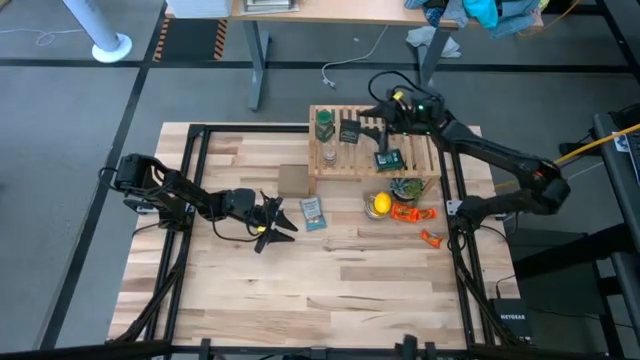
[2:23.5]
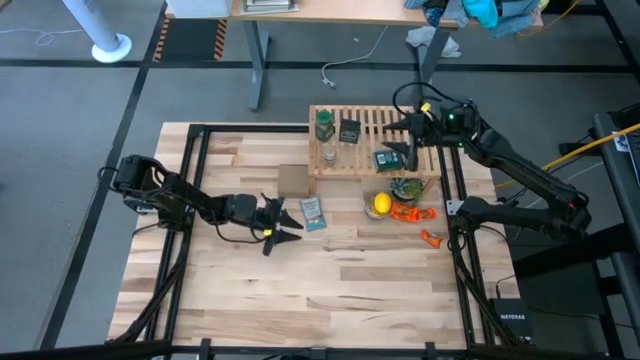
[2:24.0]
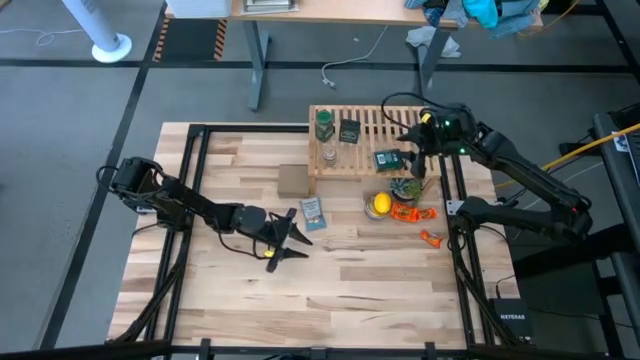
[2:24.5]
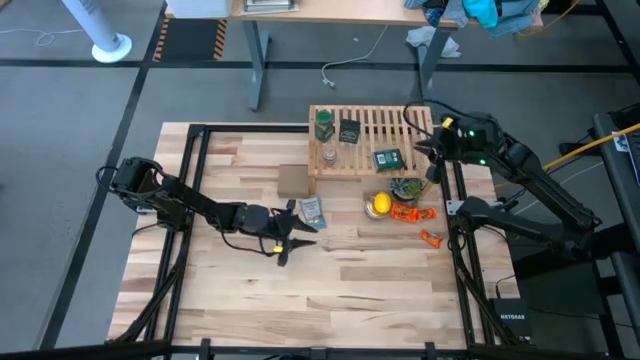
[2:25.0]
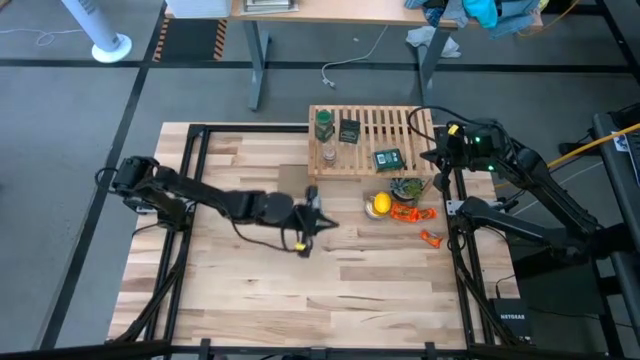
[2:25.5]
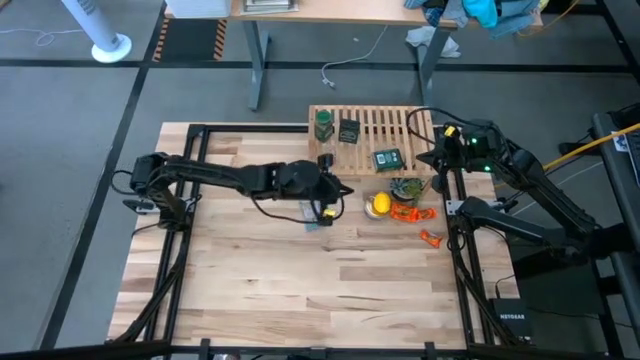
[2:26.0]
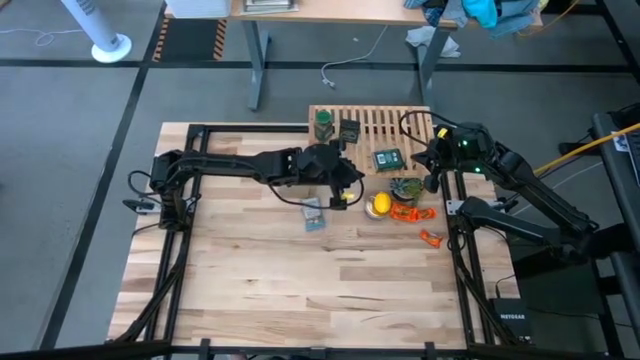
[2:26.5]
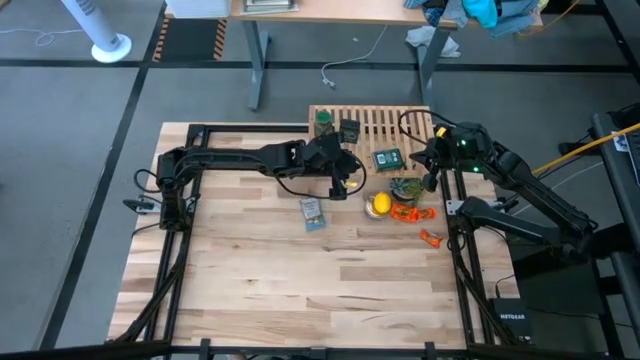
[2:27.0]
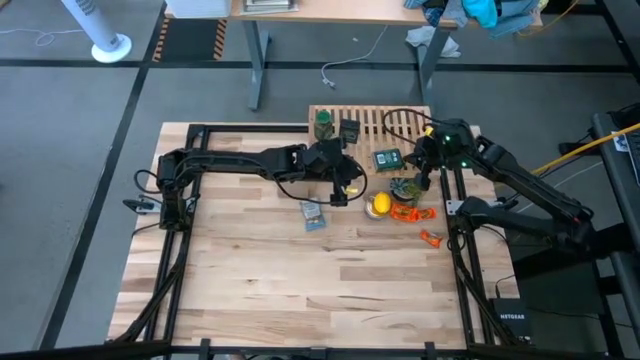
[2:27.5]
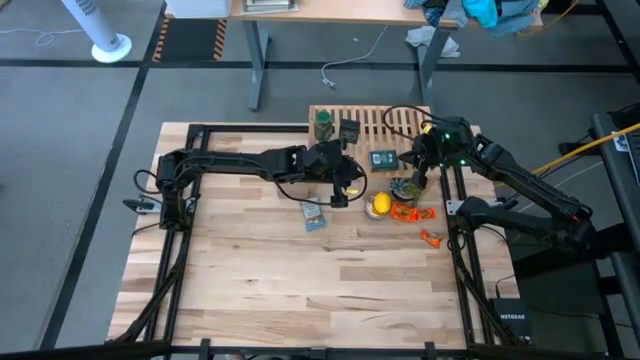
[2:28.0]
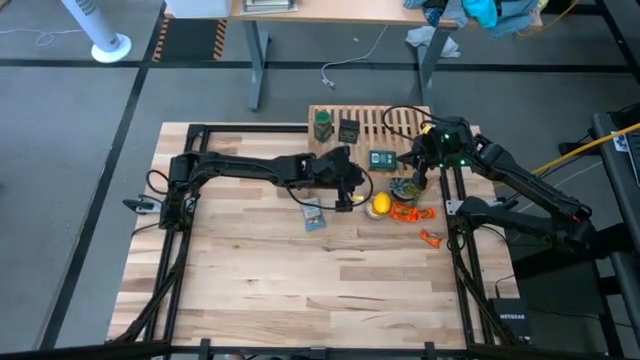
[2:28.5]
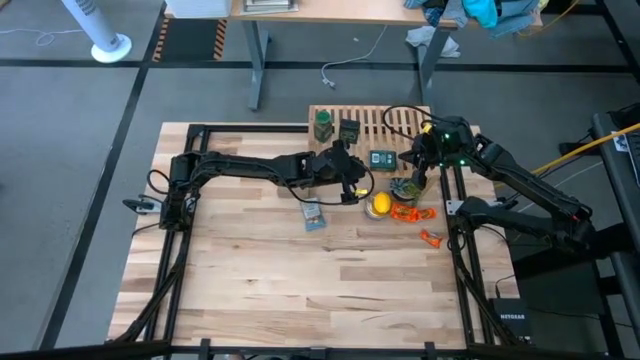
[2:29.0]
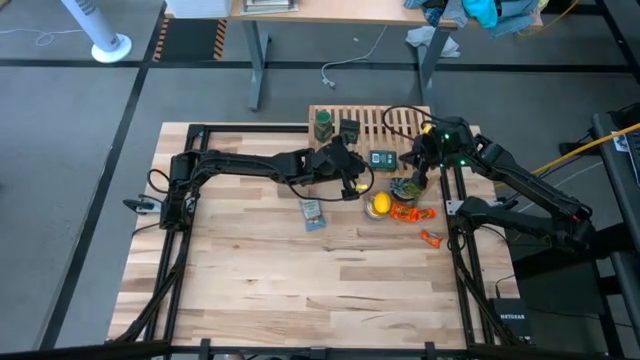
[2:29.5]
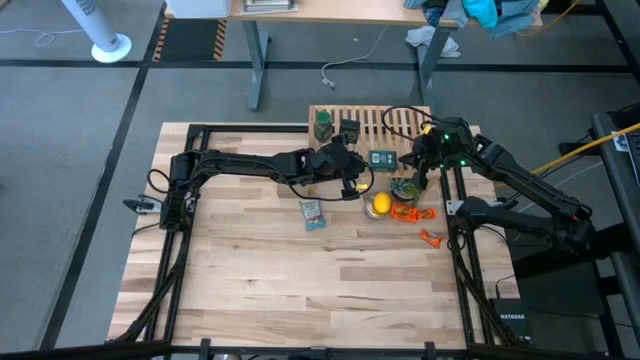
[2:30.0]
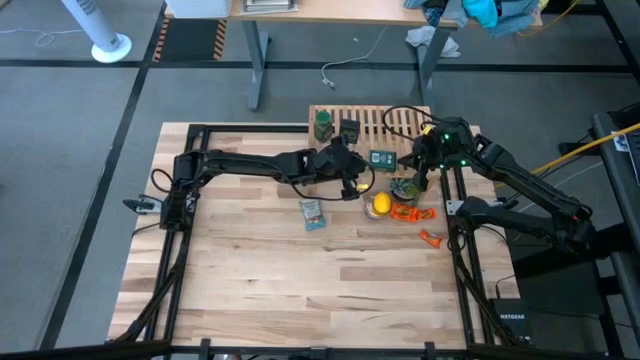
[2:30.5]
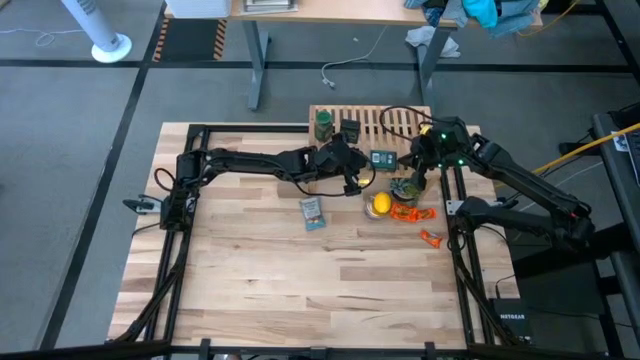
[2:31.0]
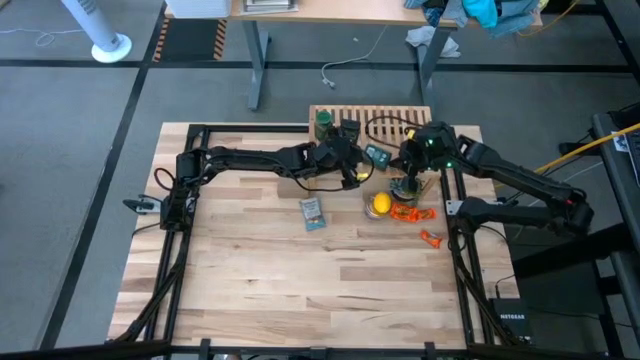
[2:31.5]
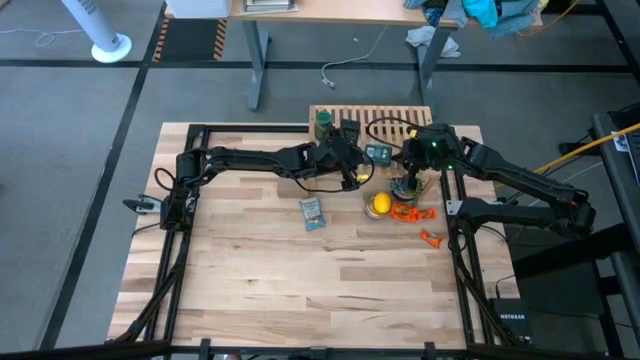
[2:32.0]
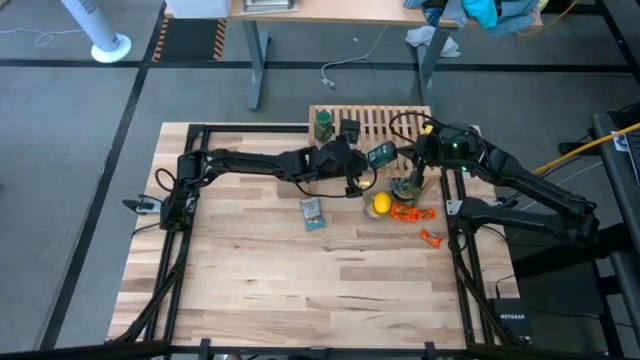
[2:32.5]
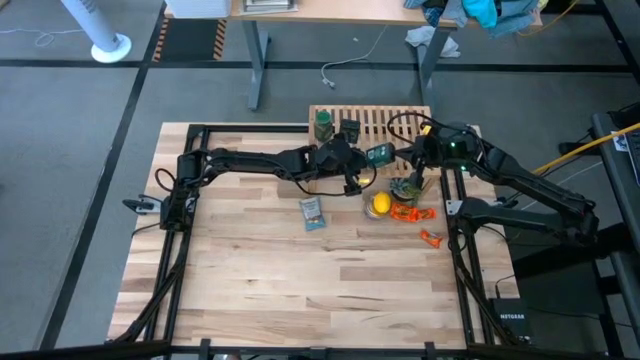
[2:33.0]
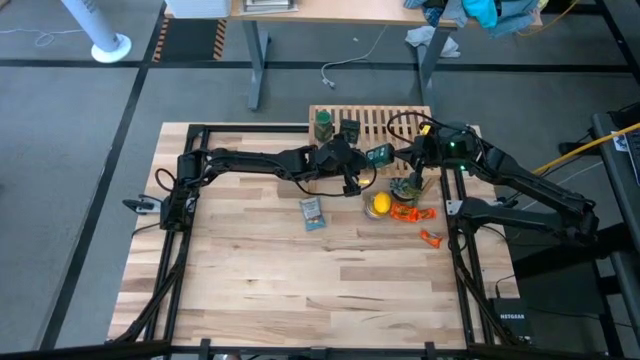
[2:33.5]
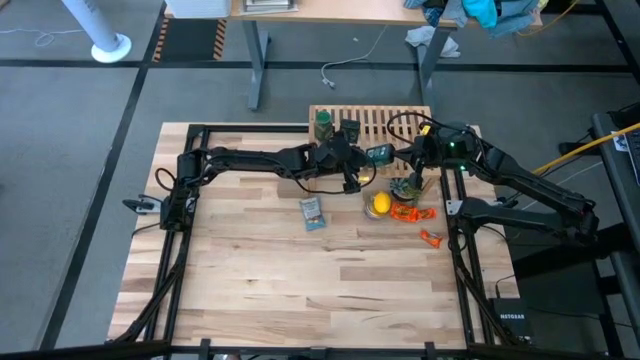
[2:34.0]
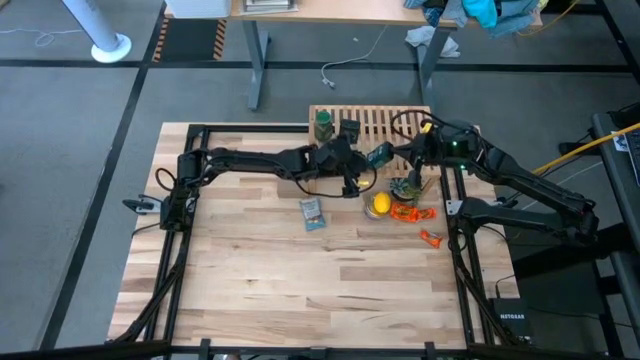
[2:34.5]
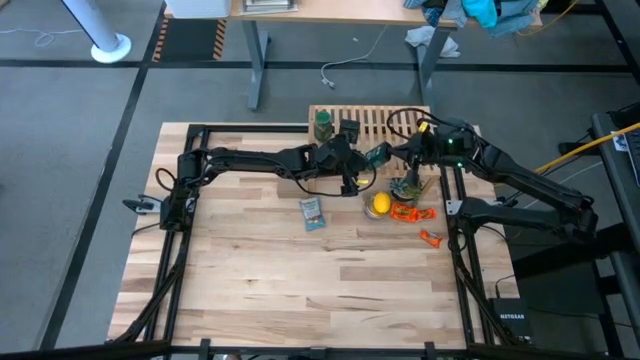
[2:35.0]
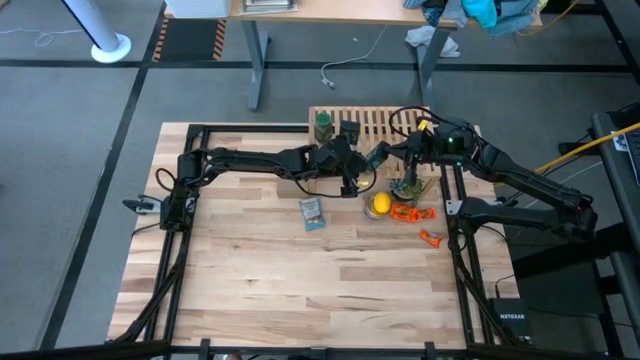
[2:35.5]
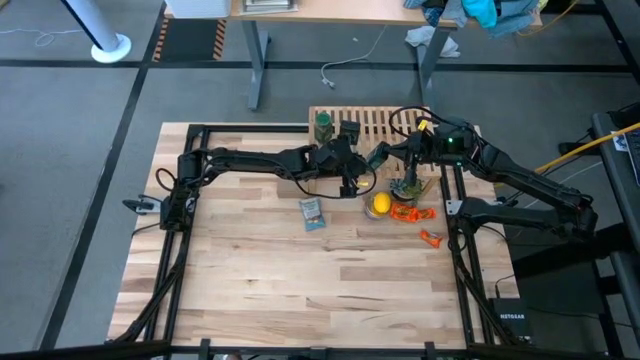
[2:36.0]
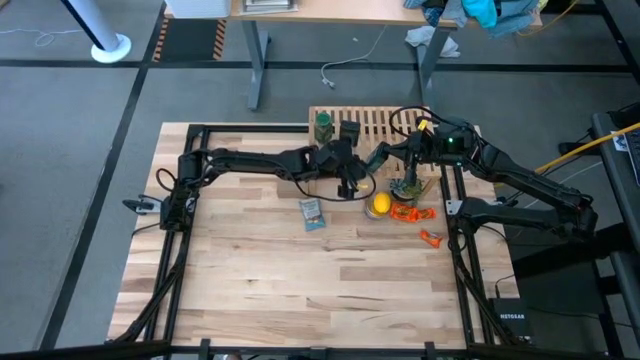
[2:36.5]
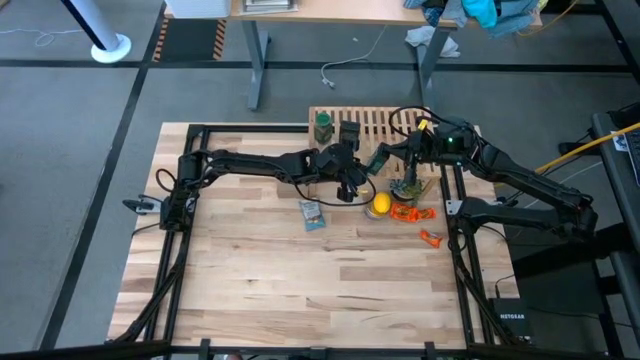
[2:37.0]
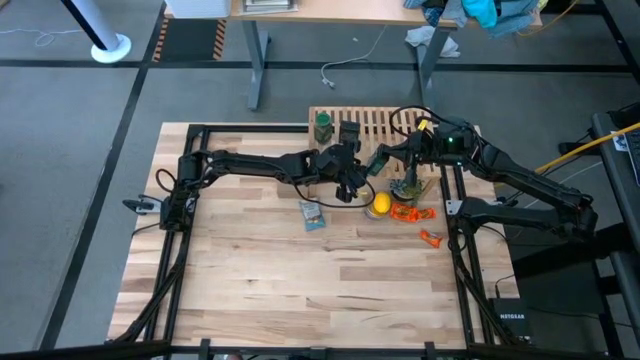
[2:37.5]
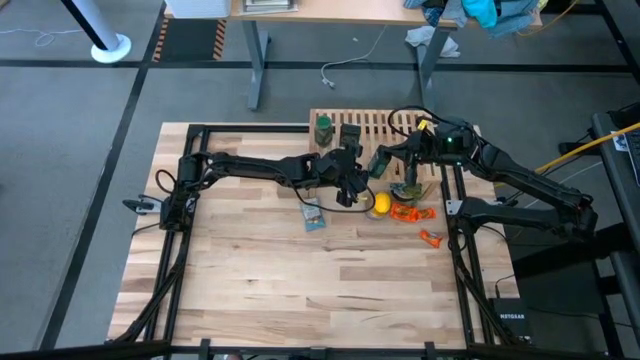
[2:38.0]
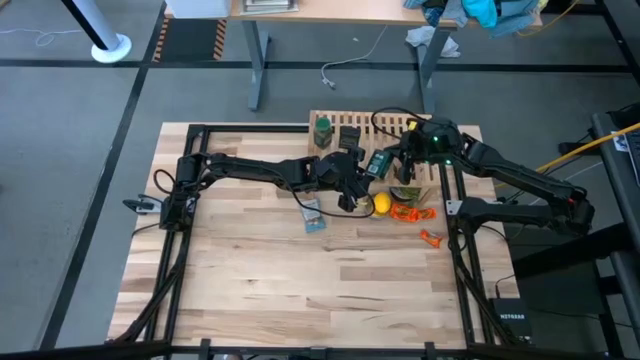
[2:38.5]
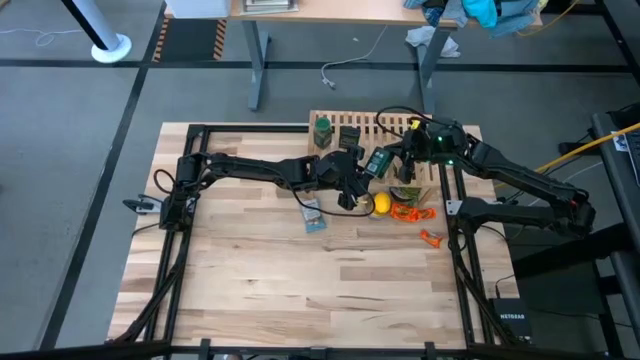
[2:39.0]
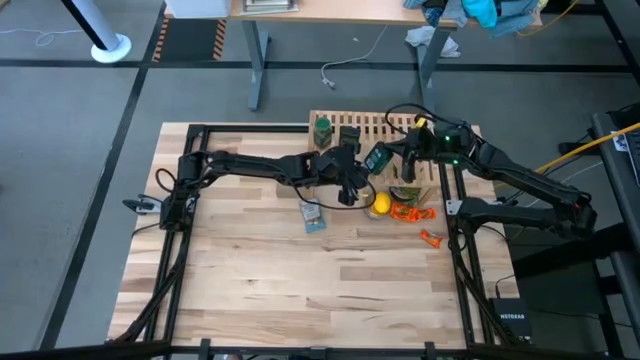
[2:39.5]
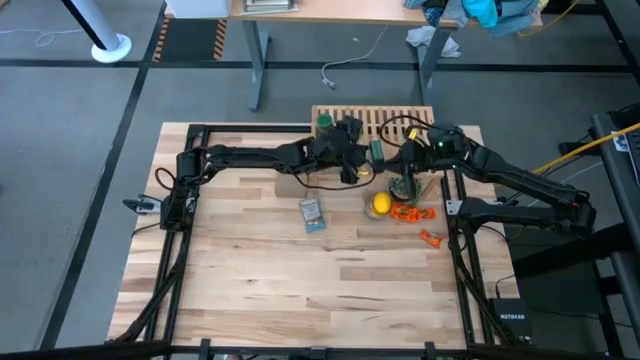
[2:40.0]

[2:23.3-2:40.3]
Task: Shelf spices
Adjust the right black seasoning can on the shelf

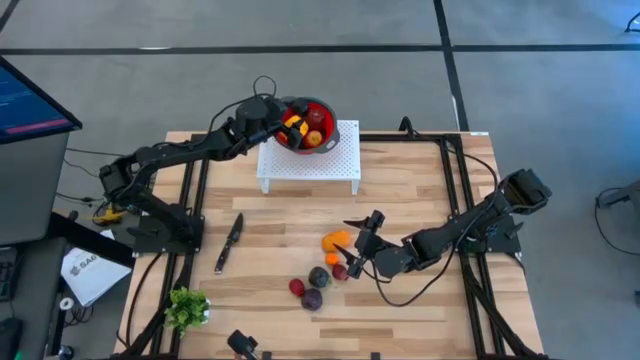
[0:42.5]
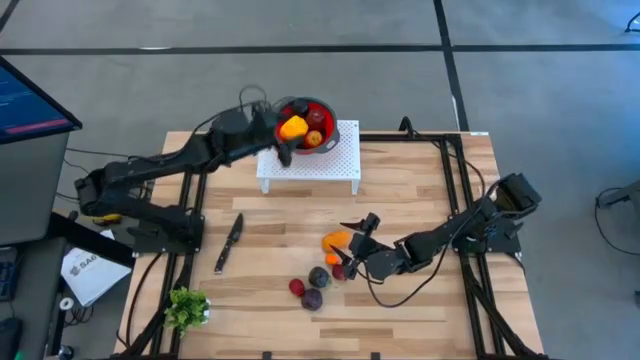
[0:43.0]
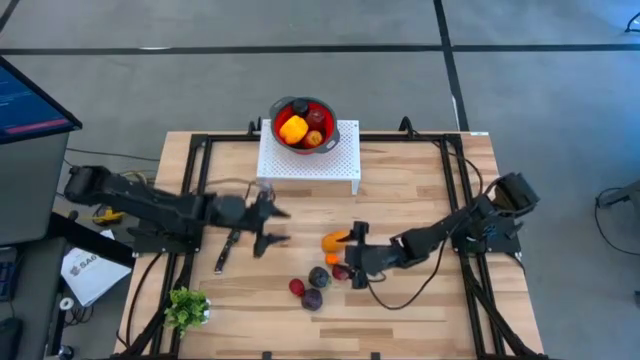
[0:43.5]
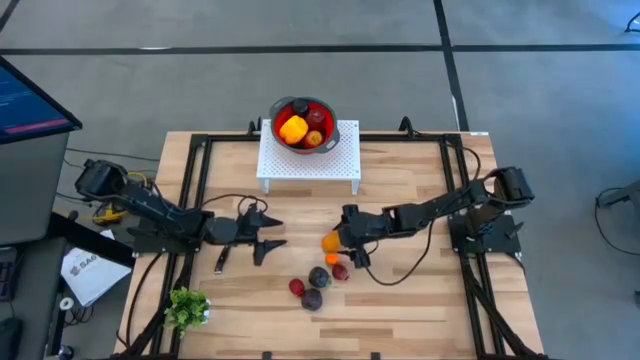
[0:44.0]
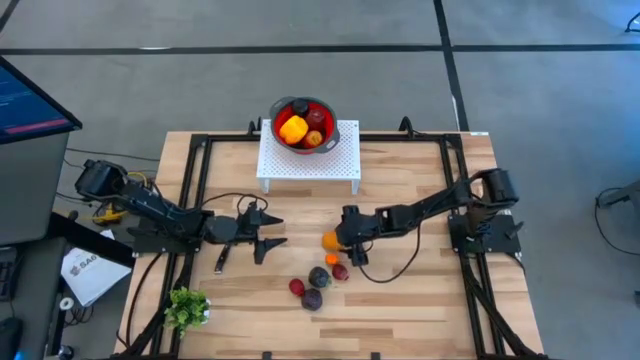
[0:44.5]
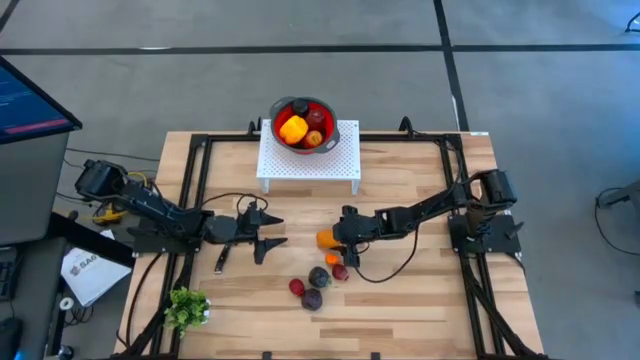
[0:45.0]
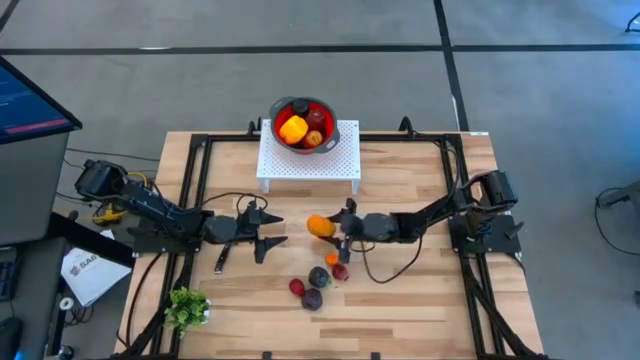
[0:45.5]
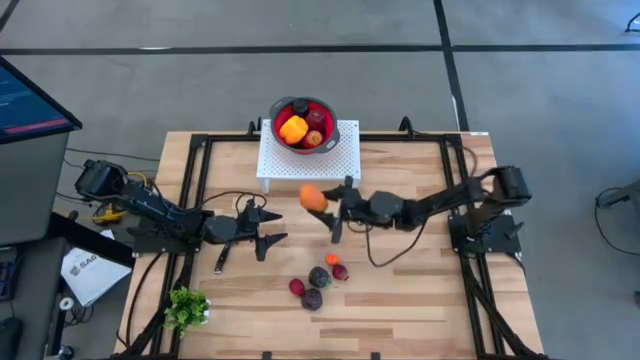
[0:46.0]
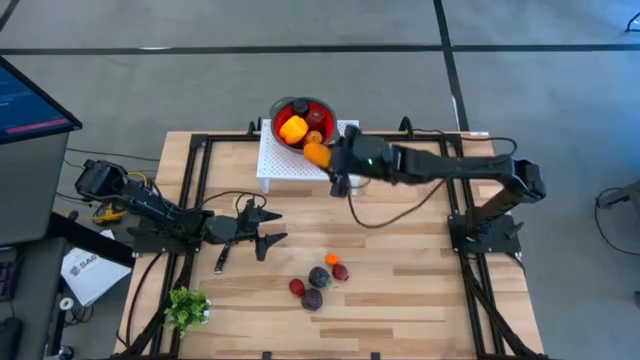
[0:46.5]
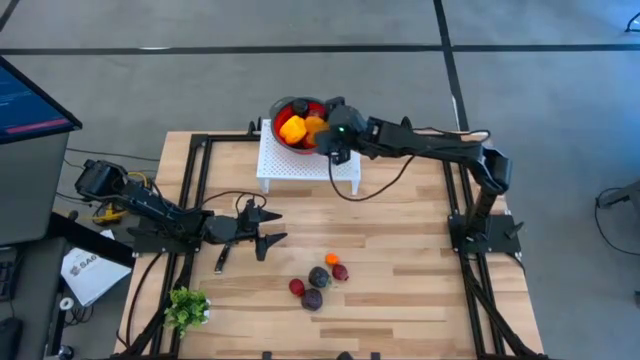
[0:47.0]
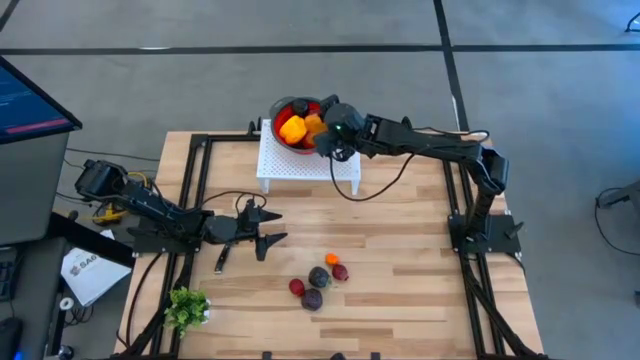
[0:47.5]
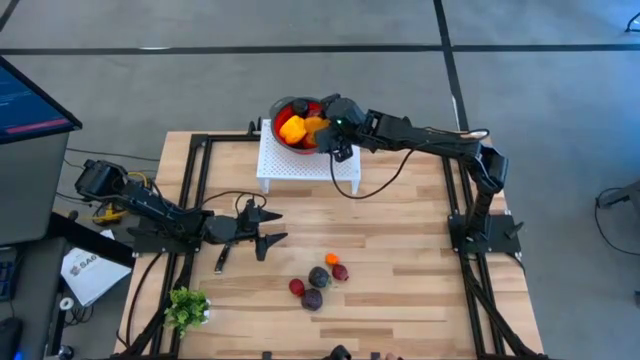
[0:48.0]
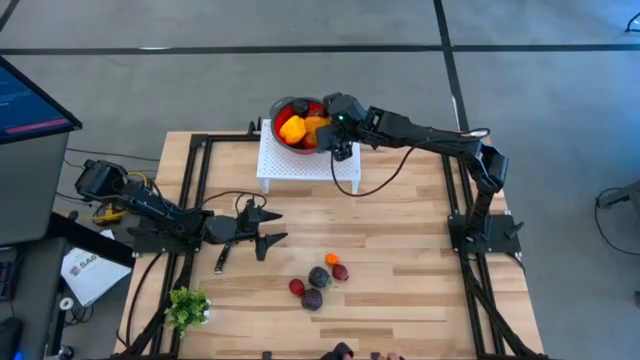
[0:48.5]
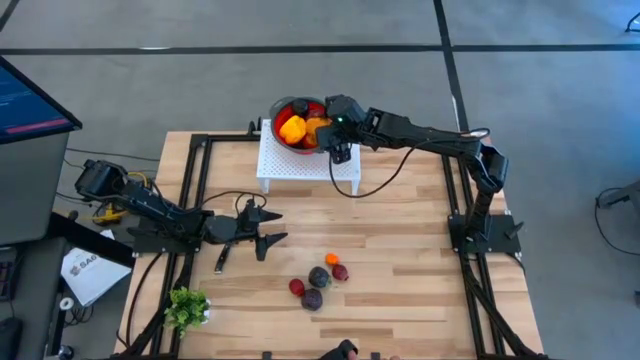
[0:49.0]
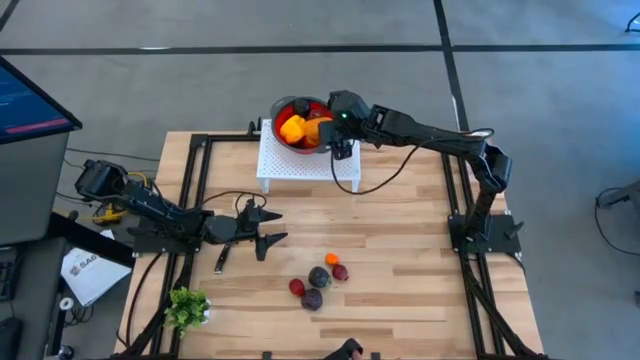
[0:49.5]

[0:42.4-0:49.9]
Task: Pick & Place Fruit
Put the potato into the red strainer bowl on the shelf
